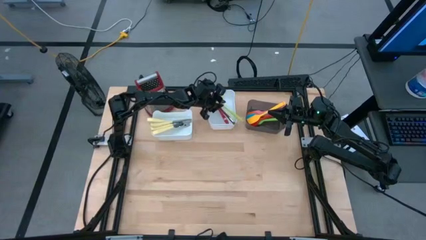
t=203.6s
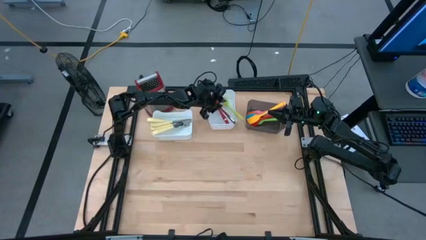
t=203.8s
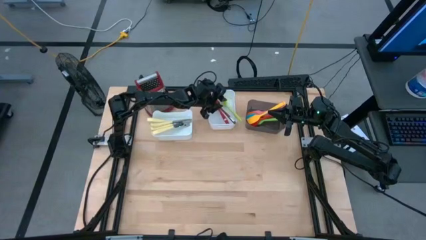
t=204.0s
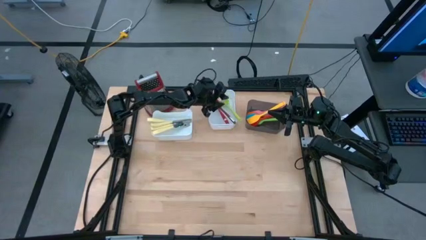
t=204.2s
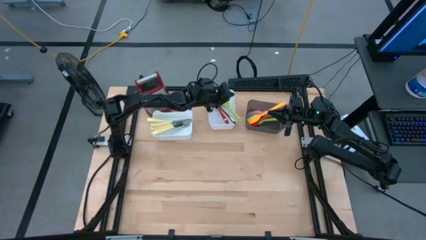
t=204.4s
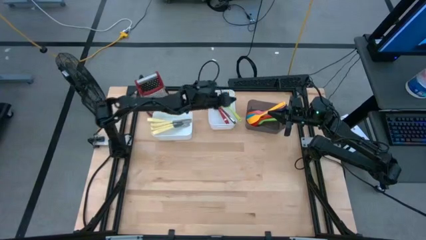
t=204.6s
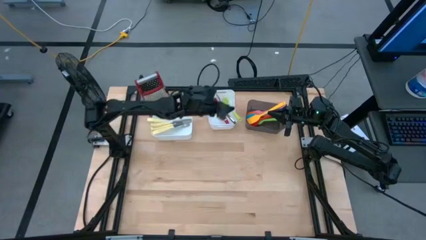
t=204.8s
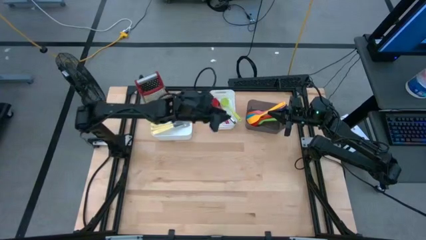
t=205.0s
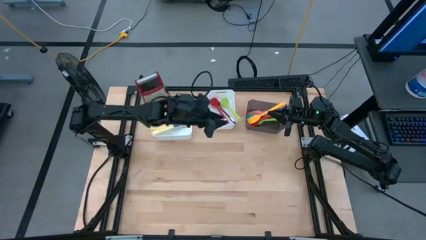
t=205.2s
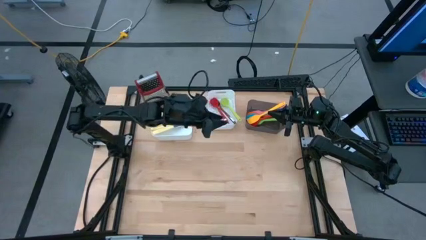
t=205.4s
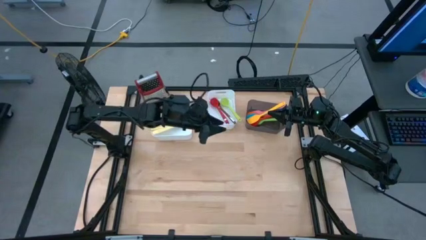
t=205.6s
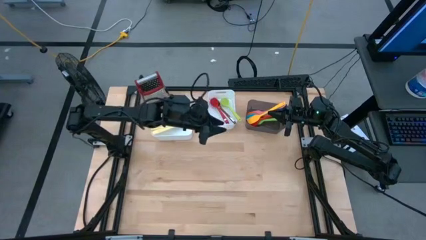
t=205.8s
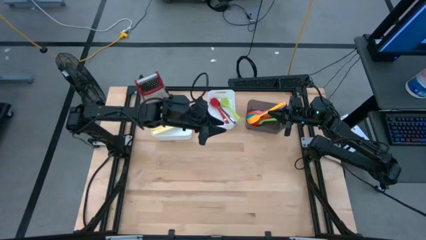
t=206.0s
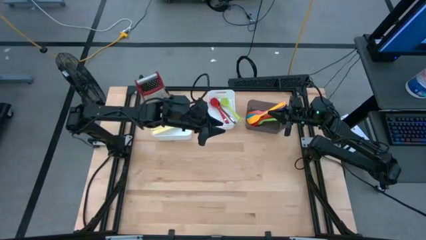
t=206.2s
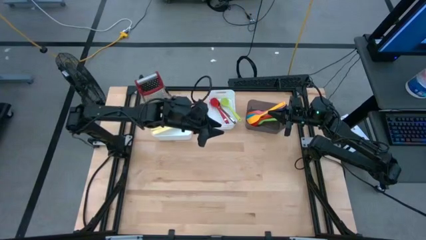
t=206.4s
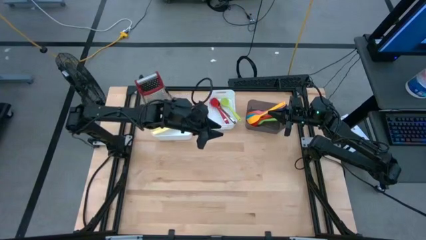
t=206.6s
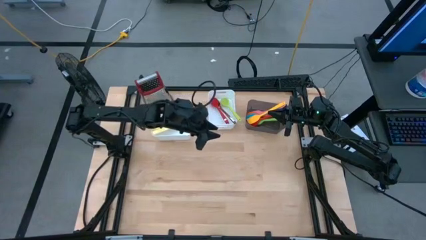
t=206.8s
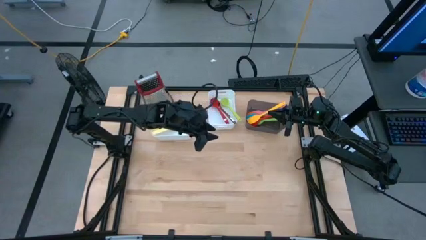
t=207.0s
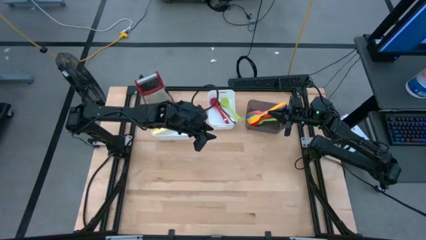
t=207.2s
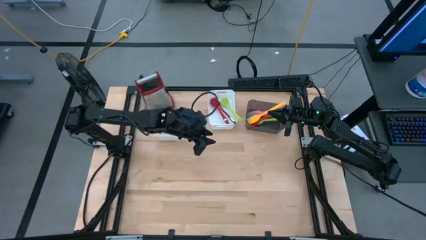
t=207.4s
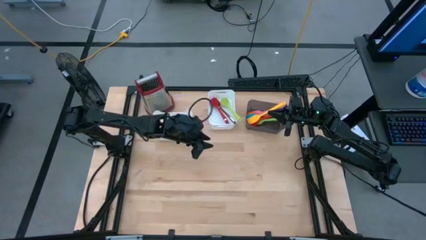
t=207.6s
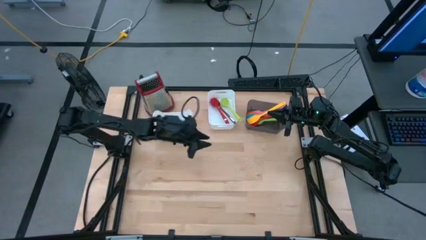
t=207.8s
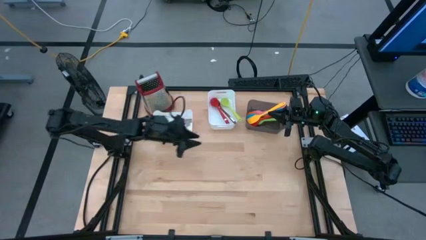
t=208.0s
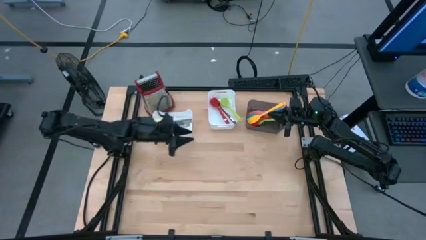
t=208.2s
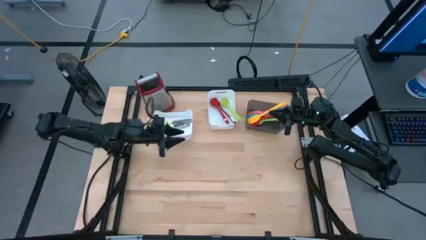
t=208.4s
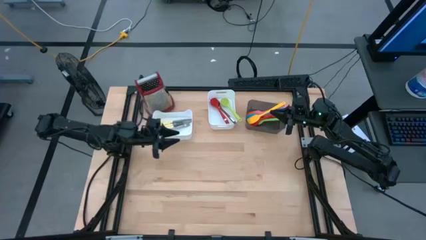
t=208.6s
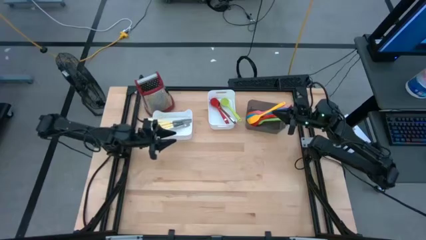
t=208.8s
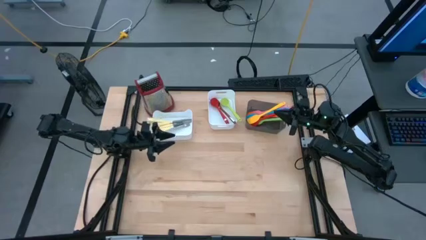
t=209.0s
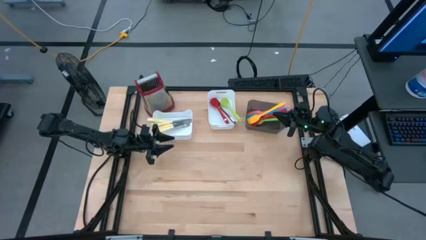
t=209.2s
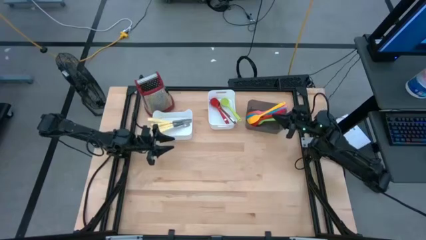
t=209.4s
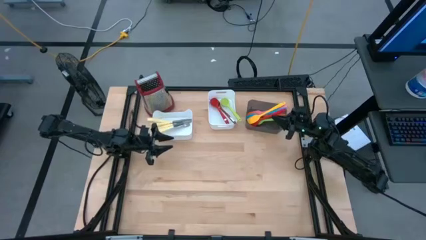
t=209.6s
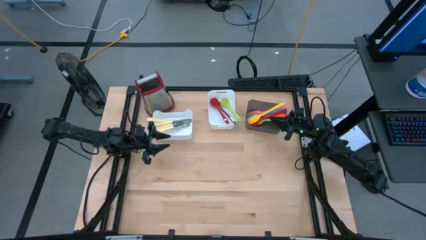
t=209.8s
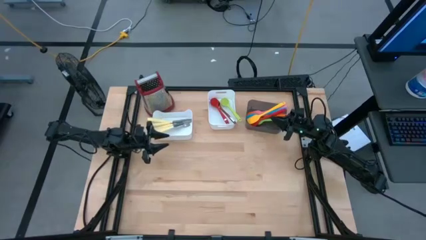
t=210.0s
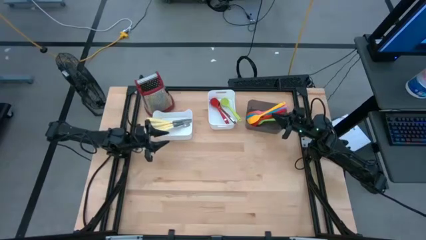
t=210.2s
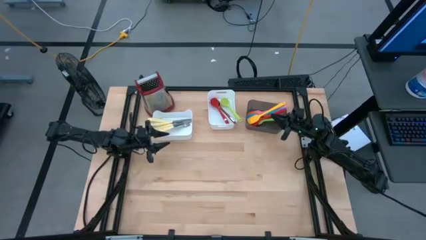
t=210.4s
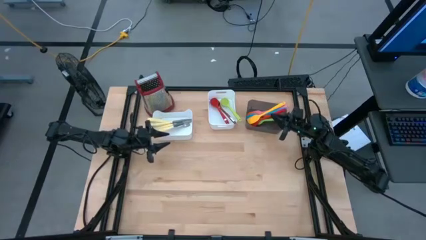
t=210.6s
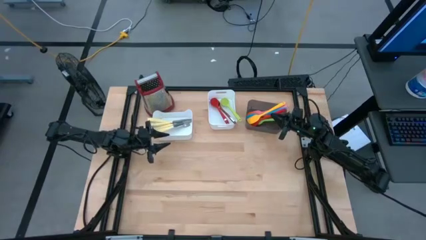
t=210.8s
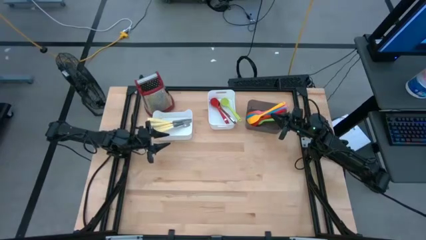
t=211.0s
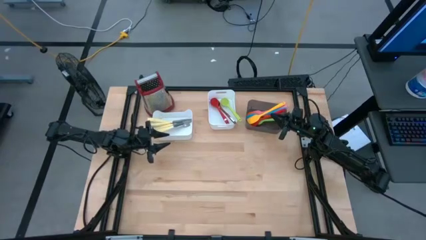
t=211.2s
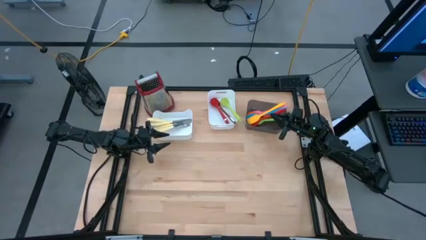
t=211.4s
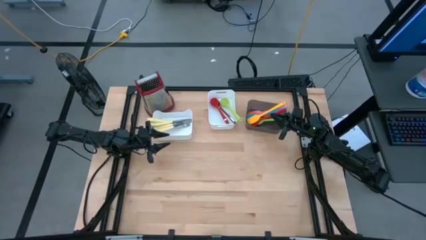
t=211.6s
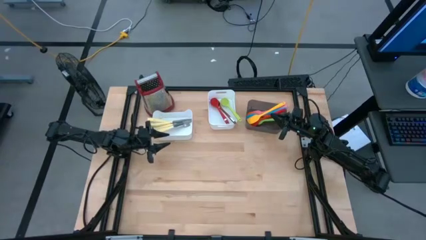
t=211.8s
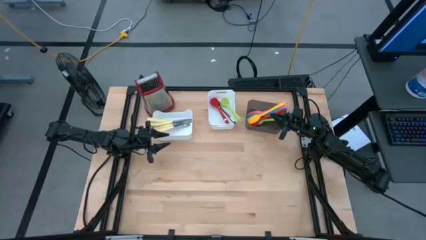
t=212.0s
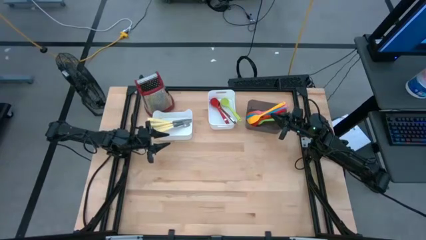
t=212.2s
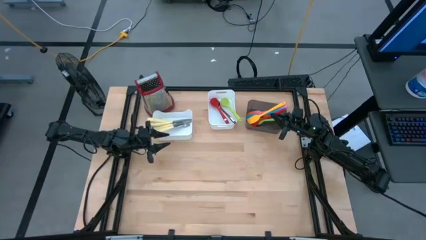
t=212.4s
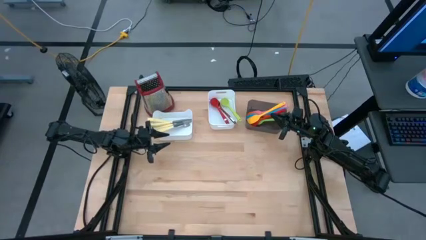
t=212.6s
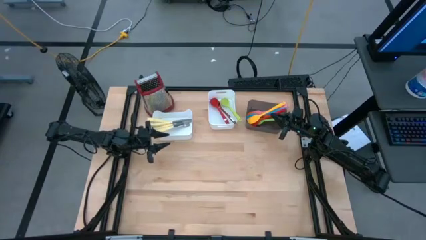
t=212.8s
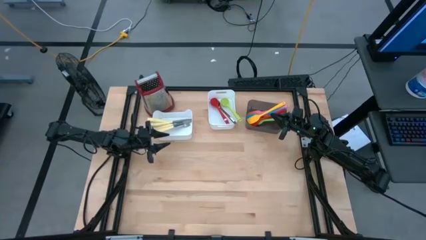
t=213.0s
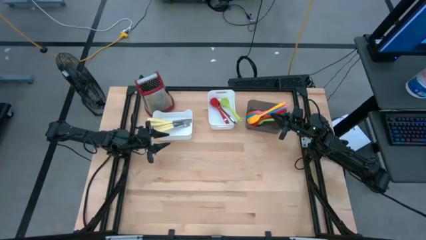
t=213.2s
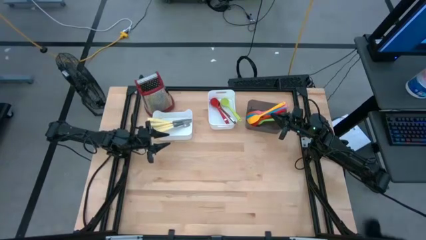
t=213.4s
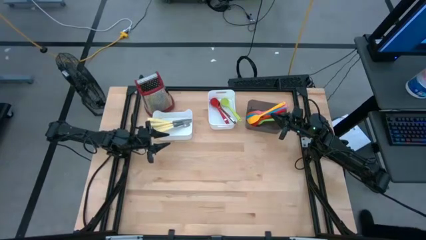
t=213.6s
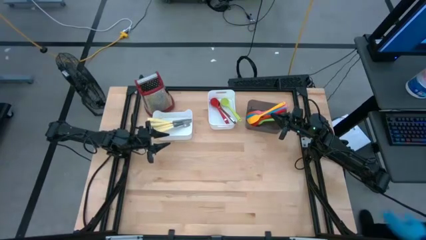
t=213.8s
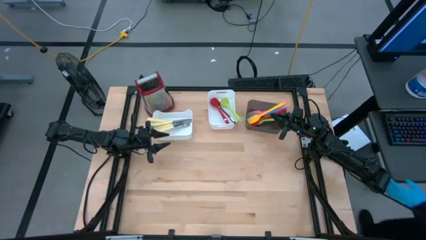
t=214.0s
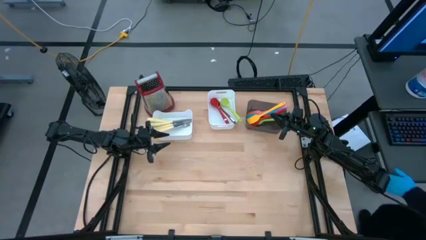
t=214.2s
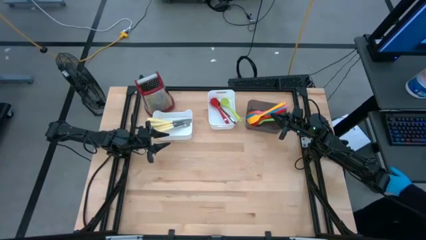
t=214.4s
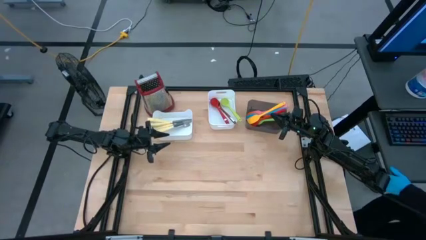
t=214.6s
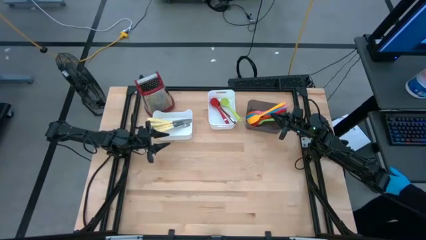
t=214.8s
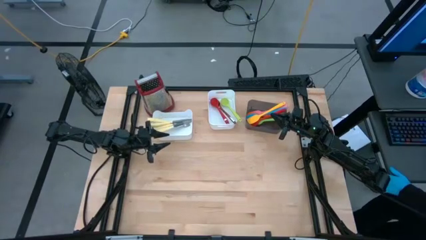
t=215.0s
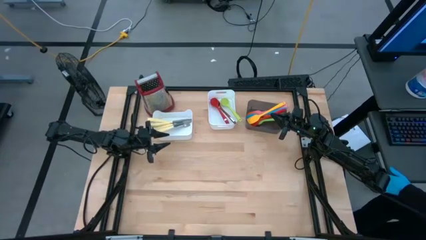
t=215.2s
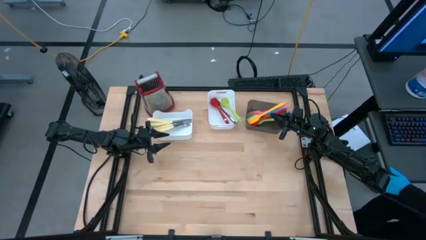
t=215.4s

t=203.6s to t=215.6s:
Task: Pick & Place Kitchen Items
Return to Home Position
